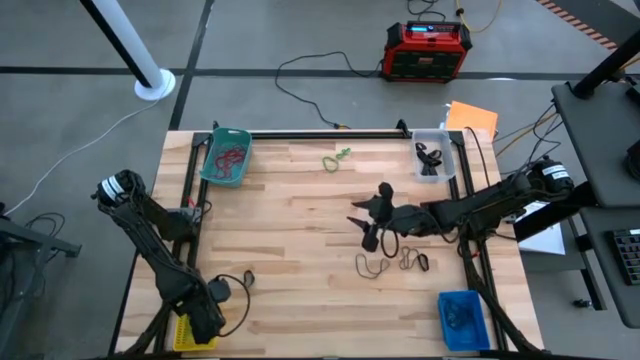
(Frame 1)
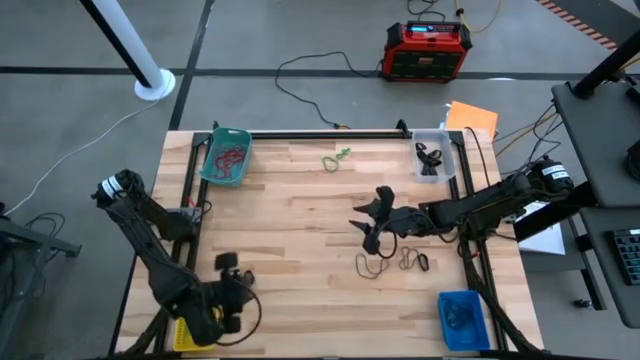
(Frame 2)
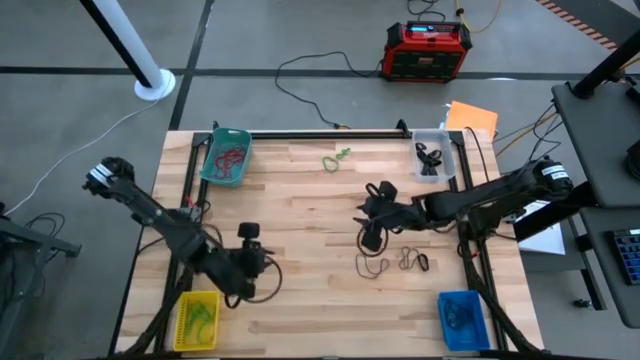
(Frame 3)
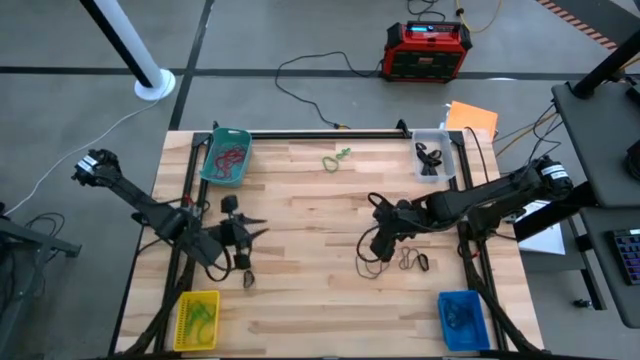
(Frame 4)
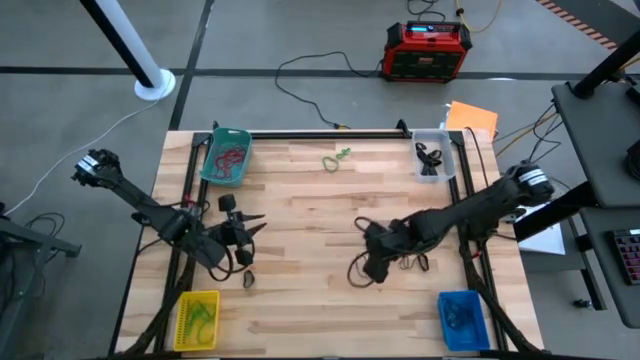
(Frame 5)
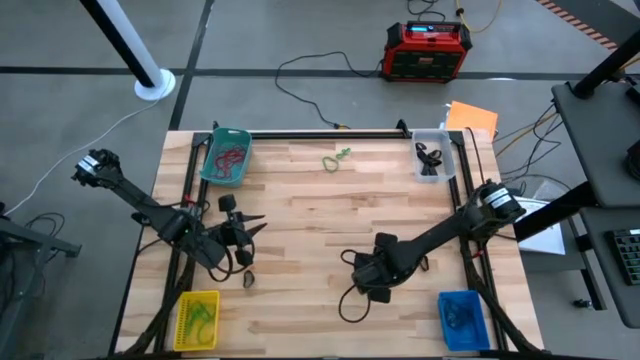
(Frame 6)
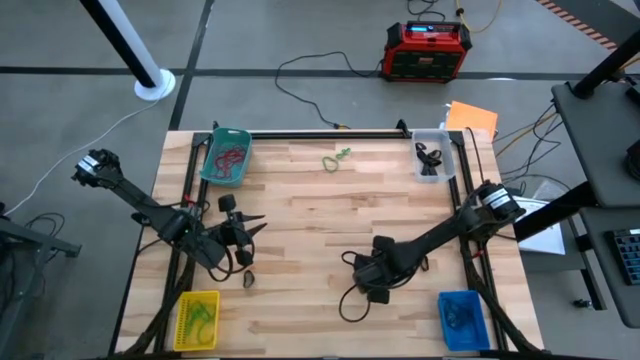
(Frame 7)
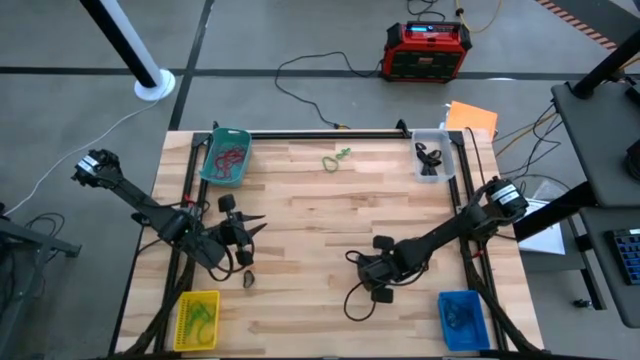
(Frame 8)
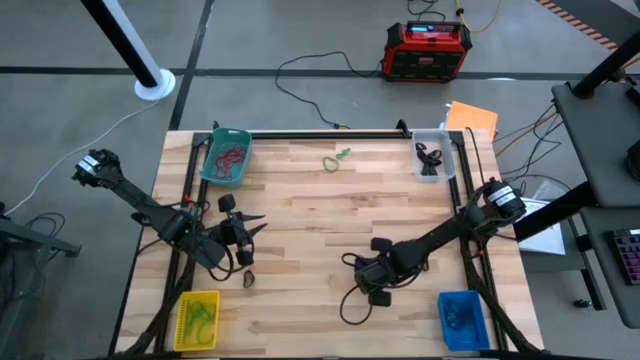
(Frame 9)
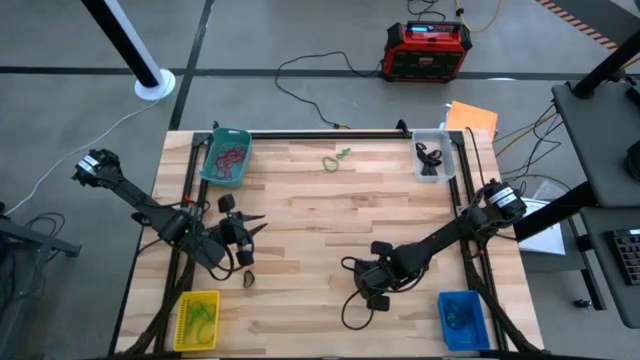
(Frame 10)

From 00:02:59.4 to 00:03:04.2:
Task: Sort rubber bands into baskets
Put the violet rubber band into the blue bin

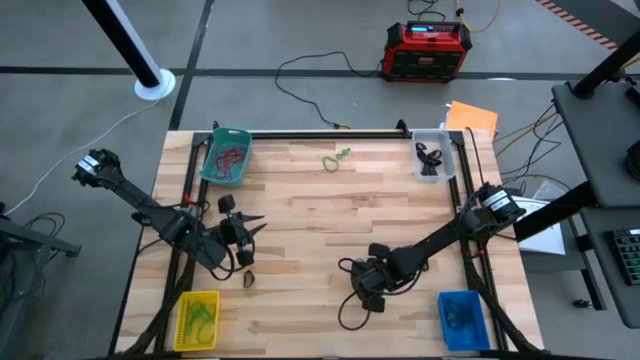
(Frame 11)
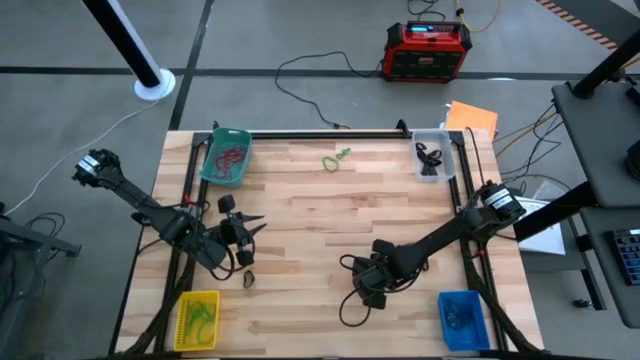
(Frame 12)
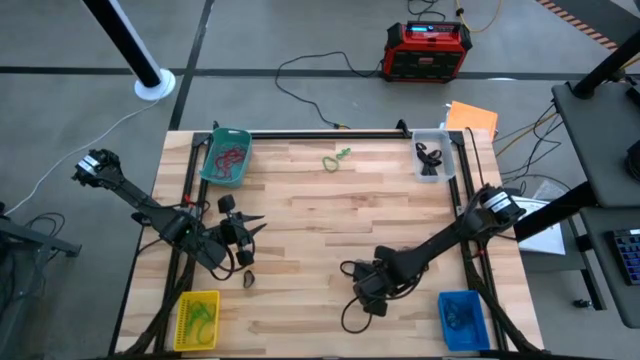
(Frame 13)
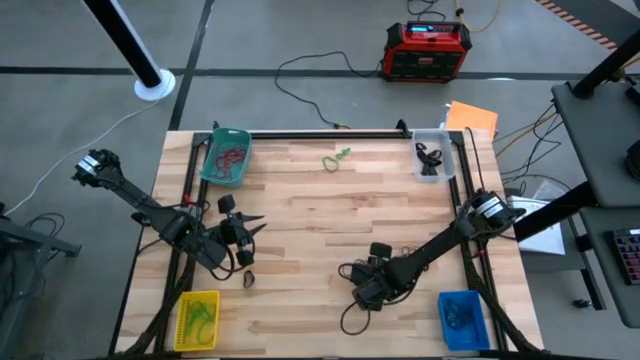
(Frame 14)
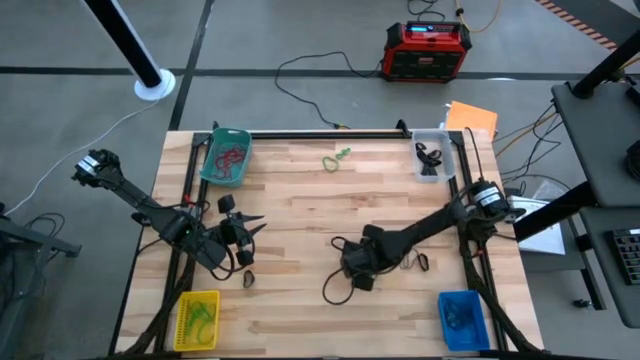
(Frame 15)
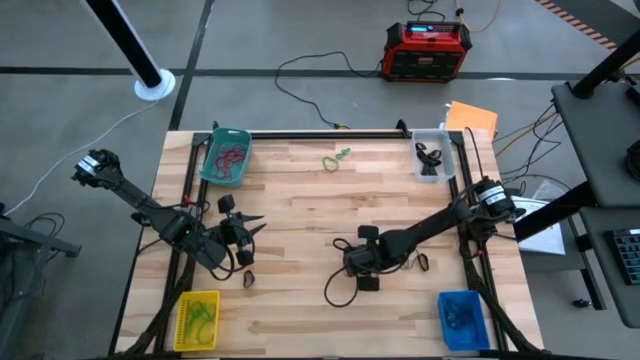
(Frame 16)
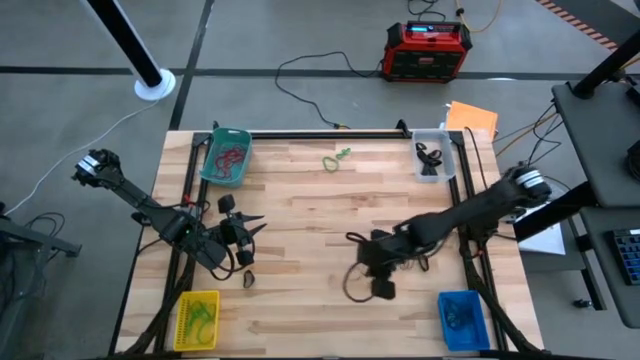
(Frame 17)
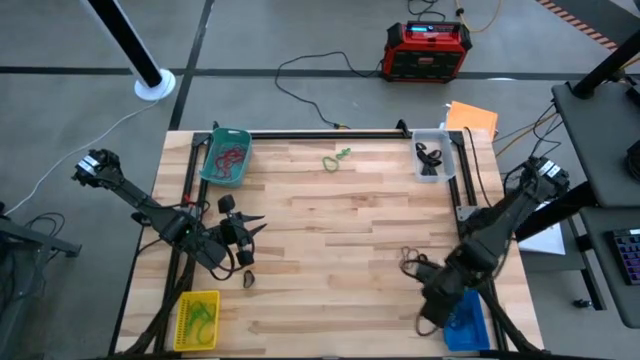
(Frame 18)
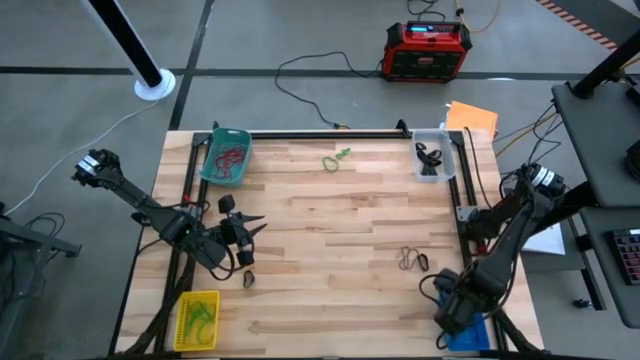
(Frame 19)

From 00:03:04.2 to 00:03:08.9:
Put the violet rubber band into the blue bin

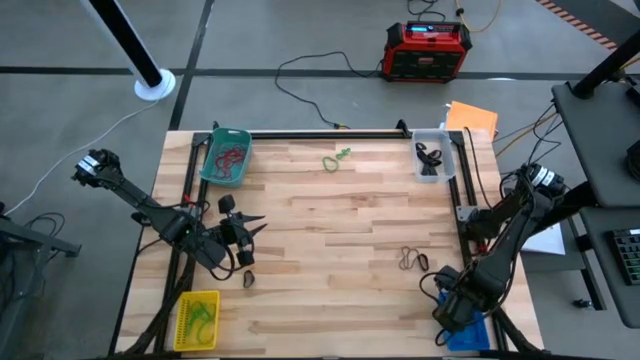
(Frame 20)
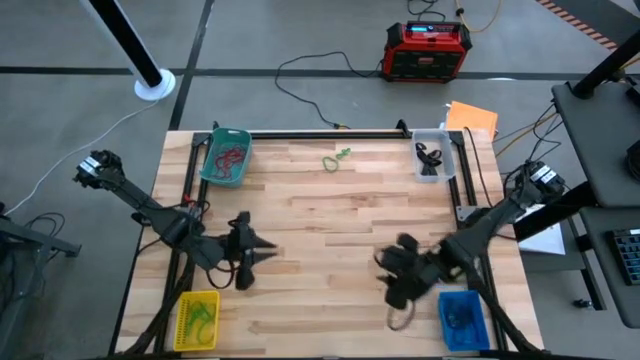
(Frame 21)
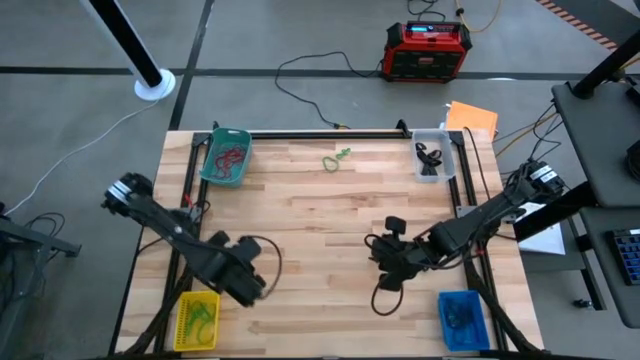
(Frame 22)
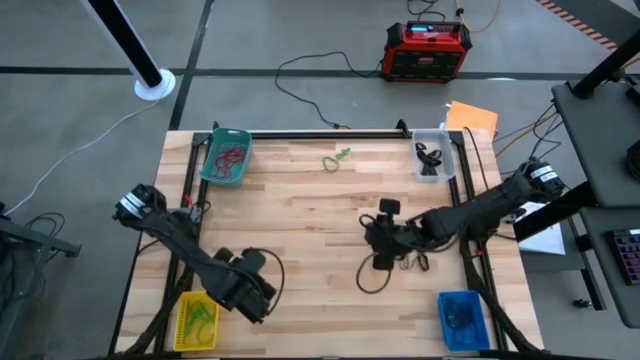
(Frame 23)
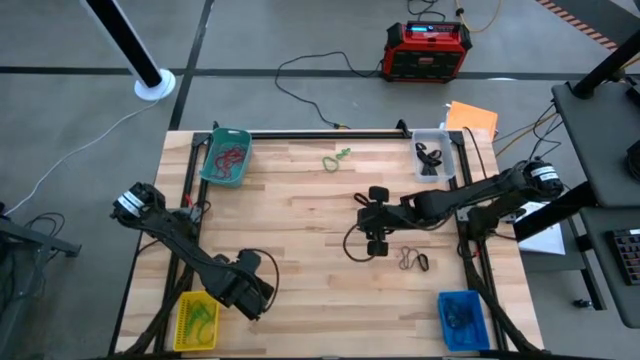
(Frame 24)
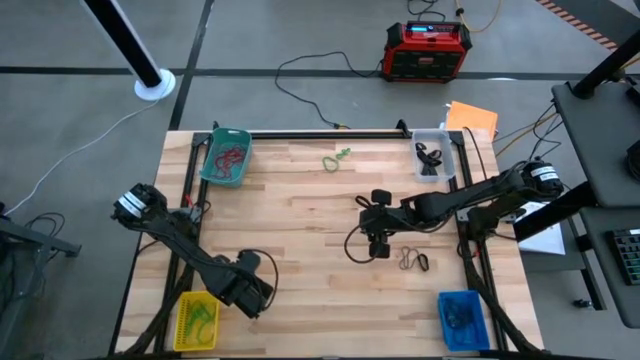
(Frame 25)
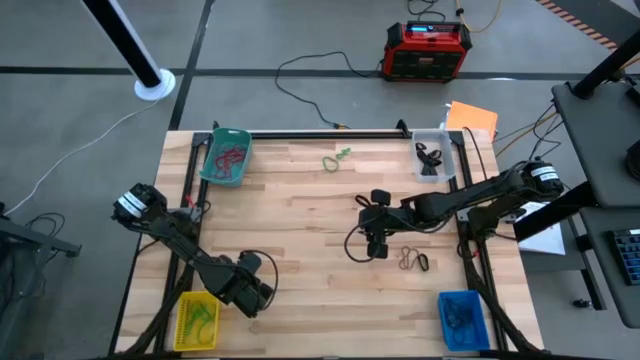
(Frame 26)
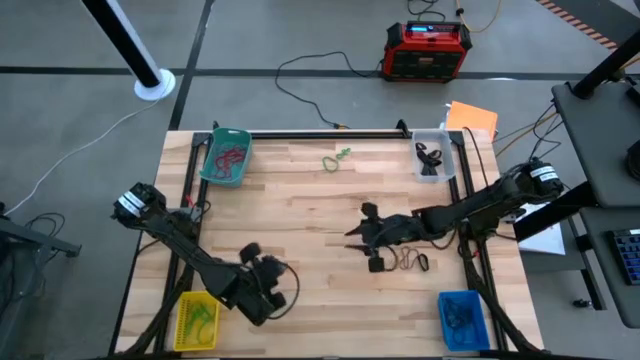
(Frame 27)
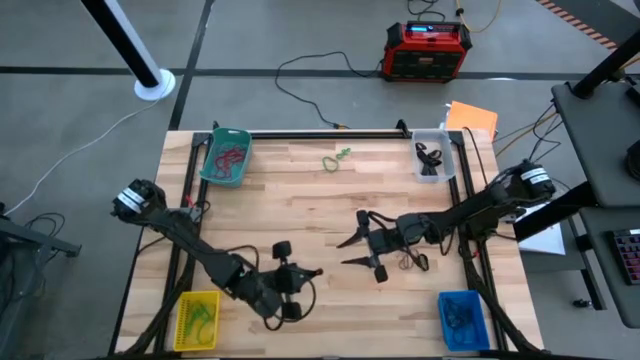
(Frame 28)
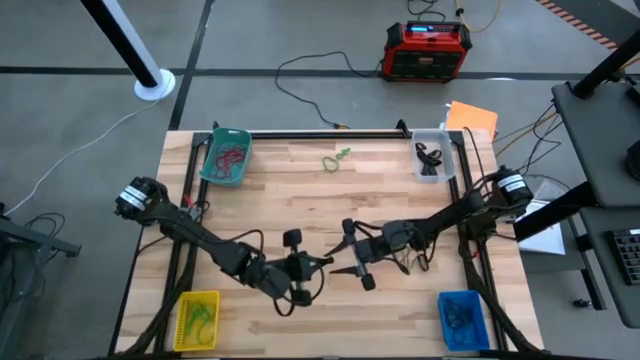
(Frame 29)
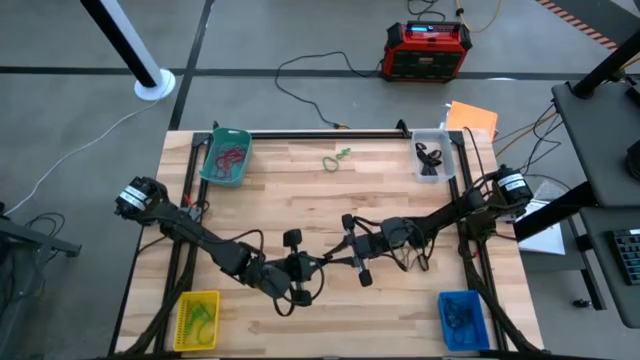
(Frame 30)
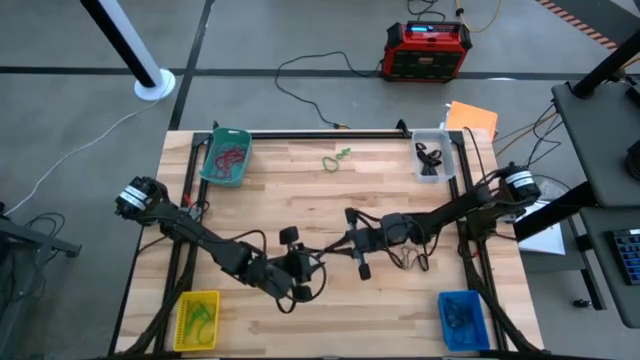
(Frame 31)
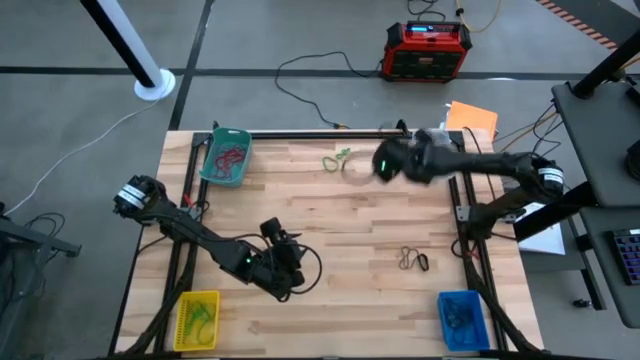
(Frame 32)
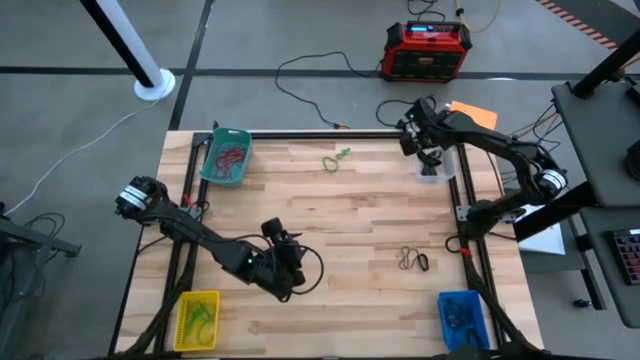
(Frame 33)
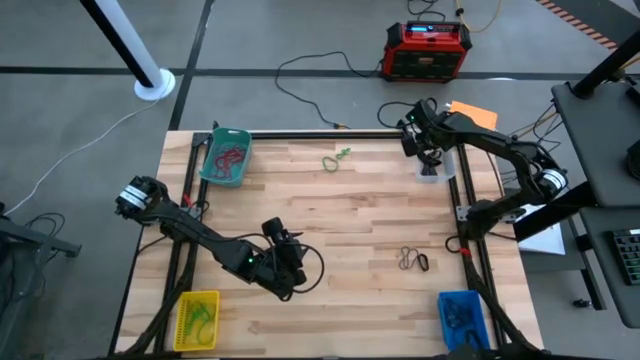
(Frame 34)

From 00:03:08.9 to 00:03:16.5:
Put the black rubber band into the transparent bin
